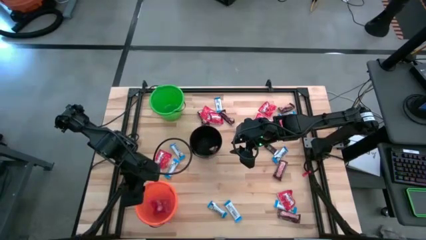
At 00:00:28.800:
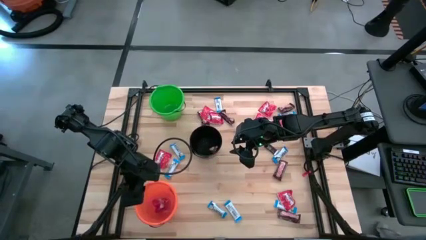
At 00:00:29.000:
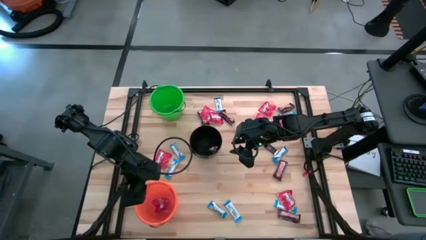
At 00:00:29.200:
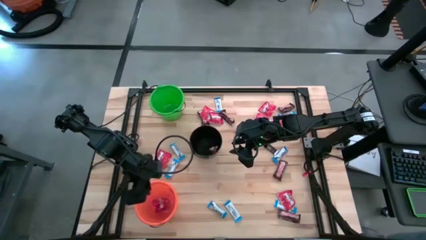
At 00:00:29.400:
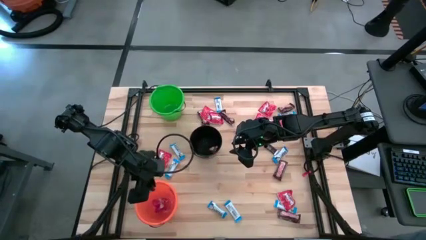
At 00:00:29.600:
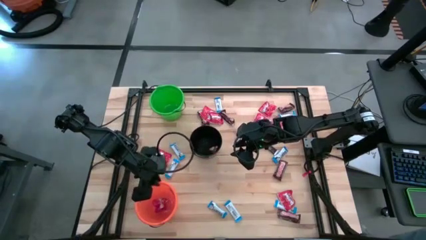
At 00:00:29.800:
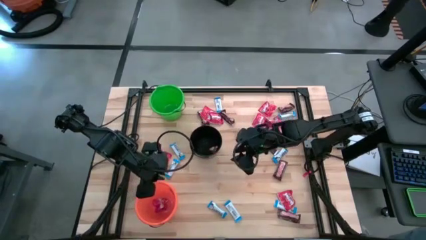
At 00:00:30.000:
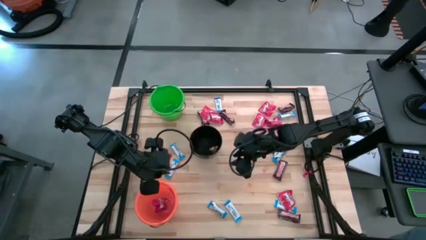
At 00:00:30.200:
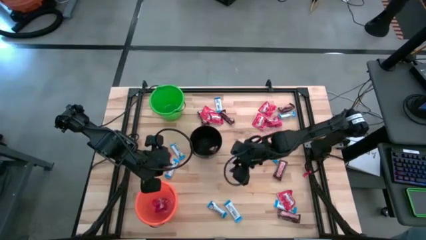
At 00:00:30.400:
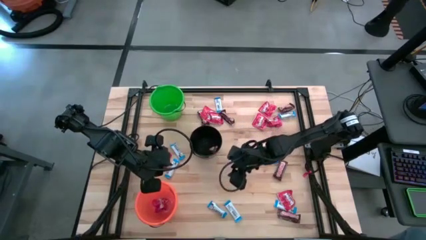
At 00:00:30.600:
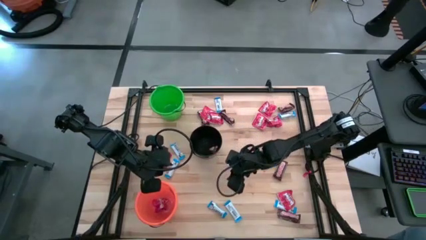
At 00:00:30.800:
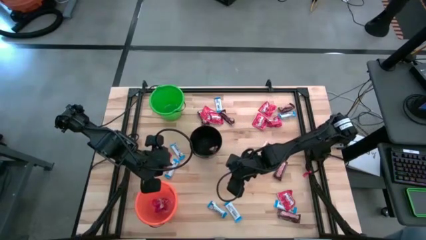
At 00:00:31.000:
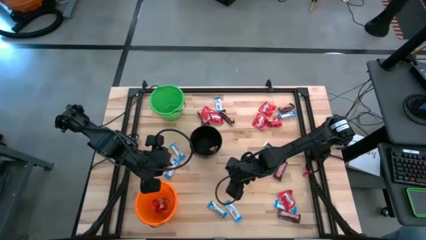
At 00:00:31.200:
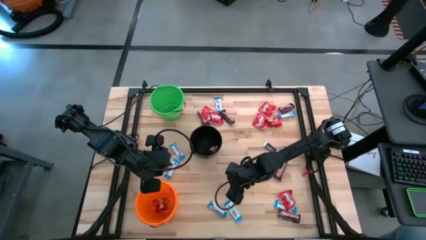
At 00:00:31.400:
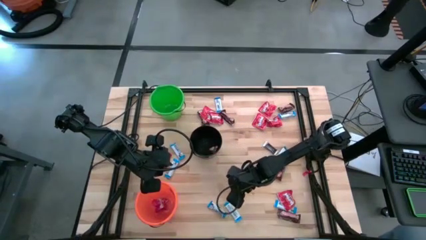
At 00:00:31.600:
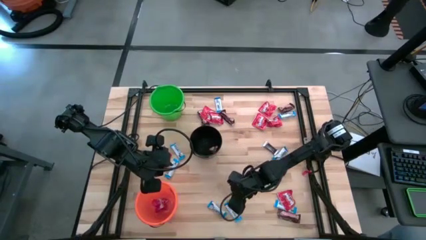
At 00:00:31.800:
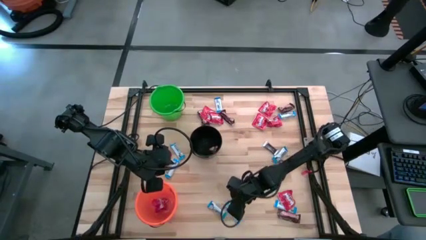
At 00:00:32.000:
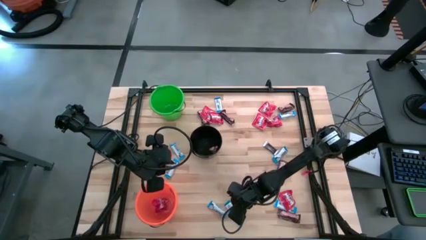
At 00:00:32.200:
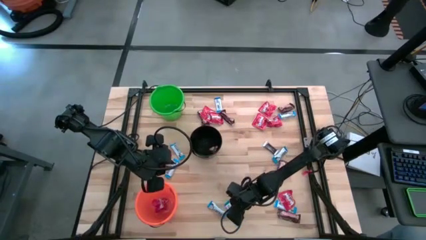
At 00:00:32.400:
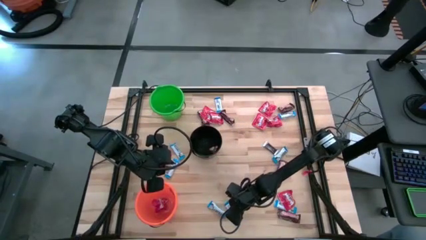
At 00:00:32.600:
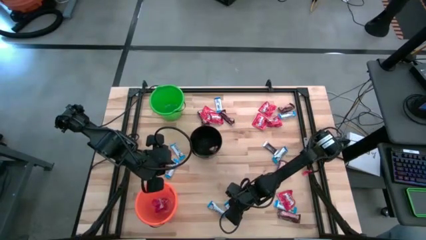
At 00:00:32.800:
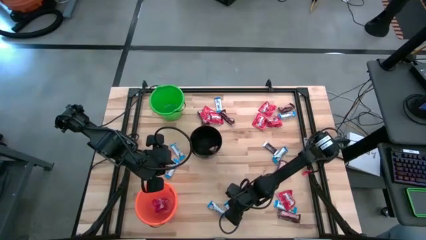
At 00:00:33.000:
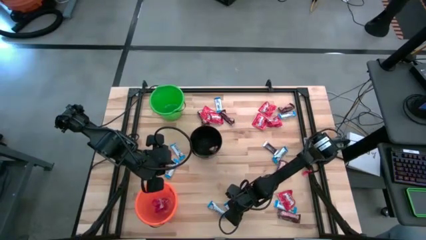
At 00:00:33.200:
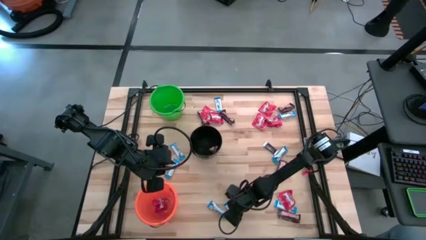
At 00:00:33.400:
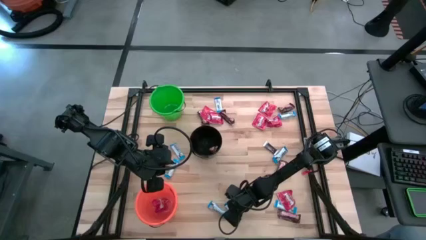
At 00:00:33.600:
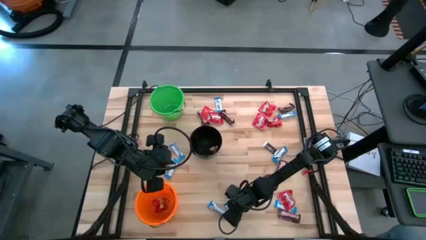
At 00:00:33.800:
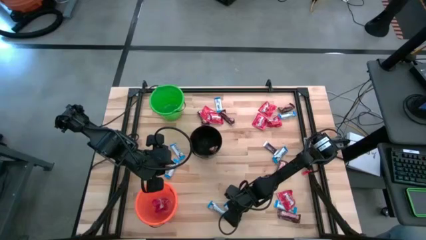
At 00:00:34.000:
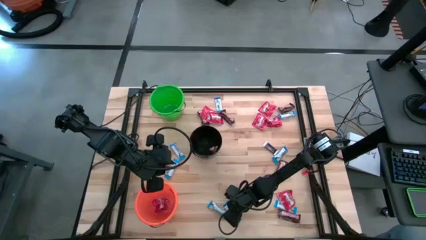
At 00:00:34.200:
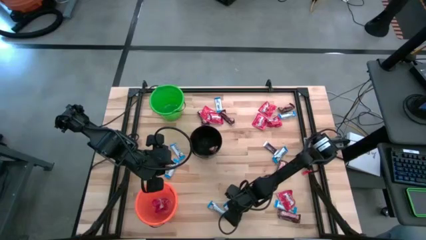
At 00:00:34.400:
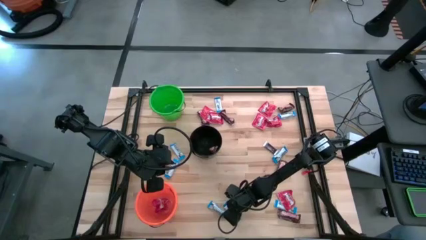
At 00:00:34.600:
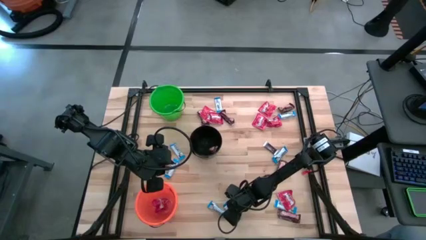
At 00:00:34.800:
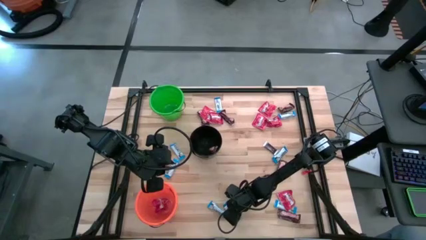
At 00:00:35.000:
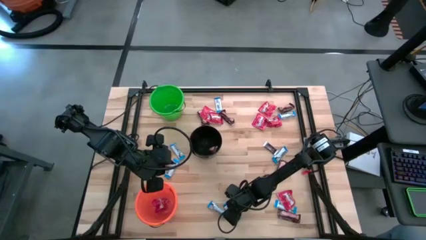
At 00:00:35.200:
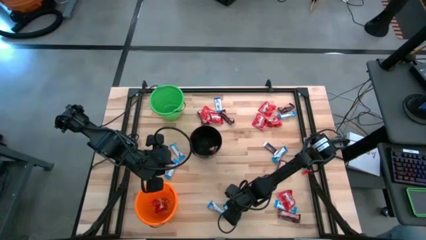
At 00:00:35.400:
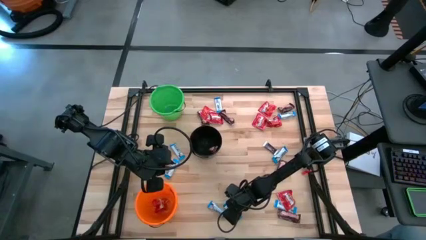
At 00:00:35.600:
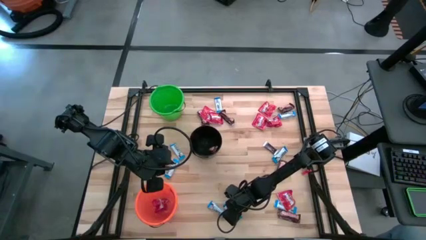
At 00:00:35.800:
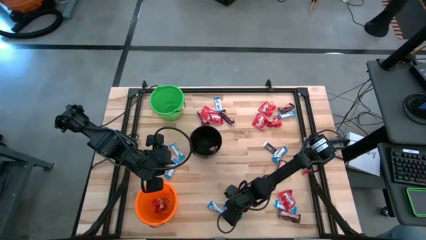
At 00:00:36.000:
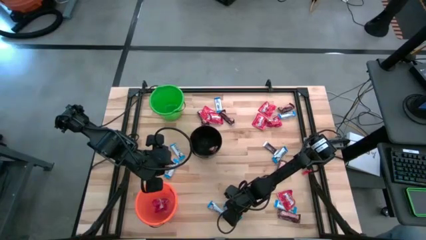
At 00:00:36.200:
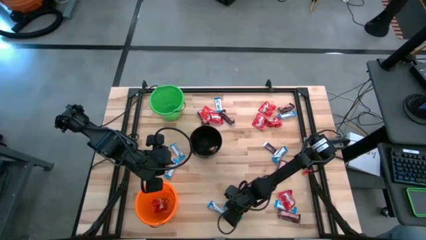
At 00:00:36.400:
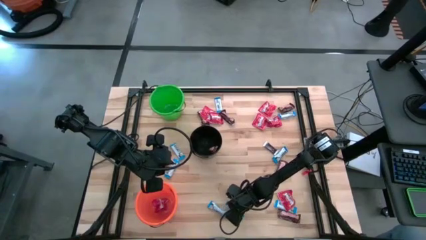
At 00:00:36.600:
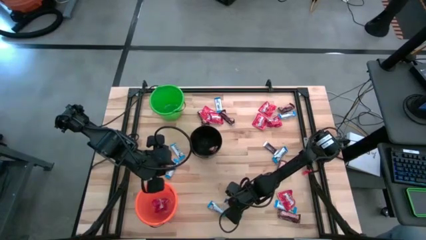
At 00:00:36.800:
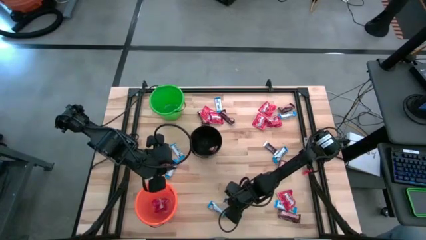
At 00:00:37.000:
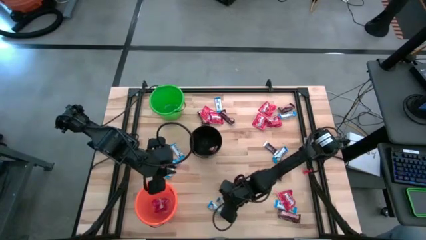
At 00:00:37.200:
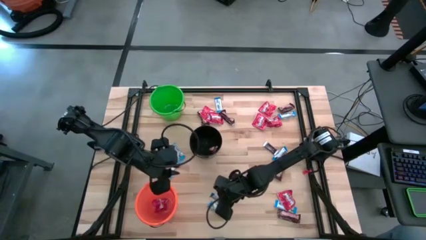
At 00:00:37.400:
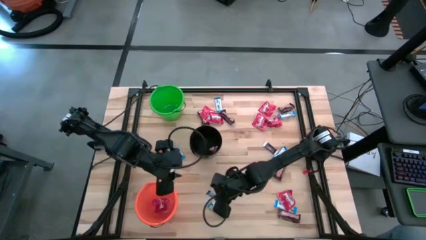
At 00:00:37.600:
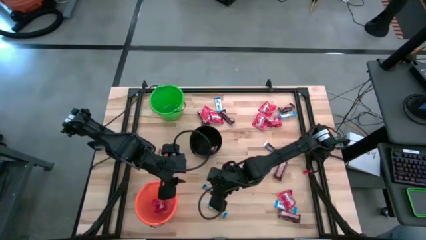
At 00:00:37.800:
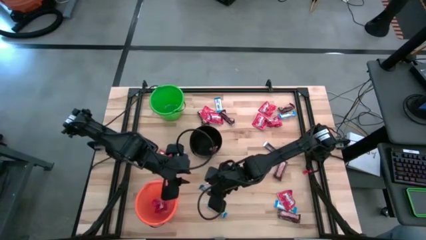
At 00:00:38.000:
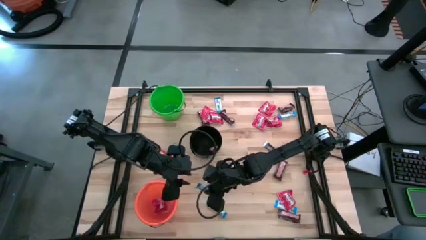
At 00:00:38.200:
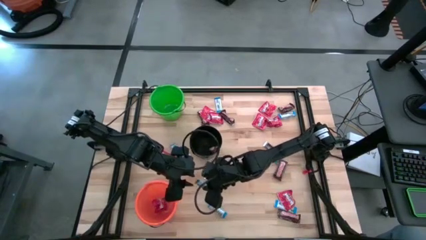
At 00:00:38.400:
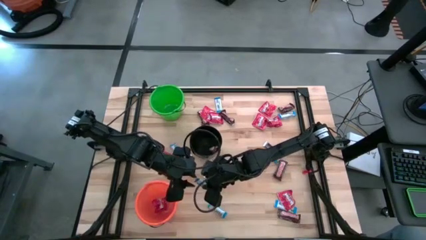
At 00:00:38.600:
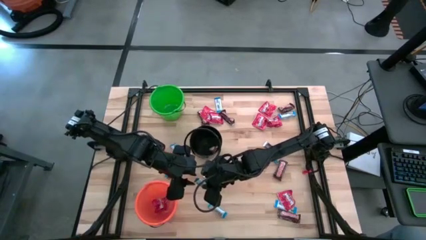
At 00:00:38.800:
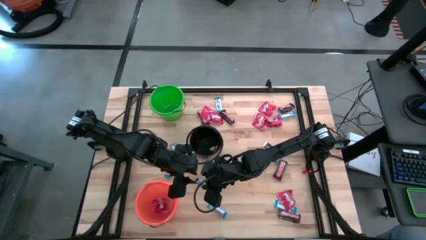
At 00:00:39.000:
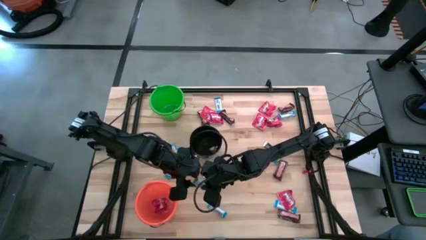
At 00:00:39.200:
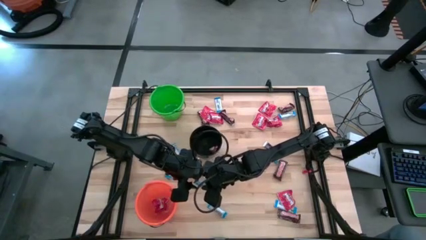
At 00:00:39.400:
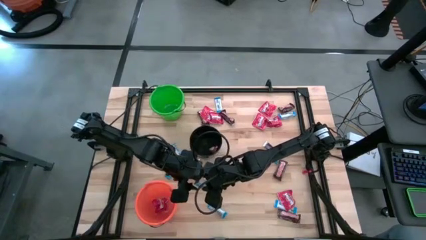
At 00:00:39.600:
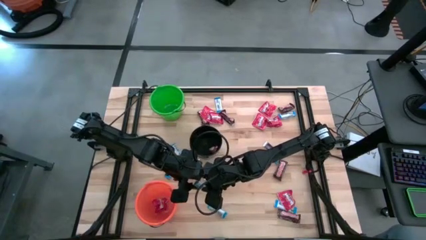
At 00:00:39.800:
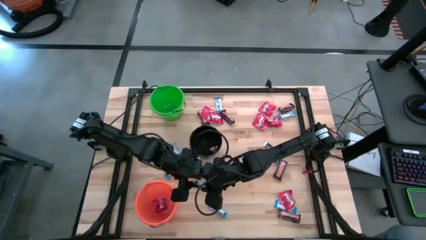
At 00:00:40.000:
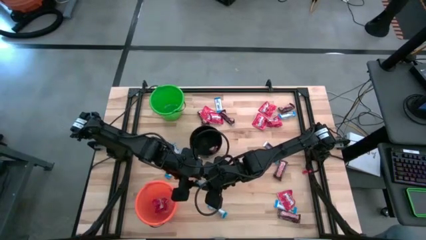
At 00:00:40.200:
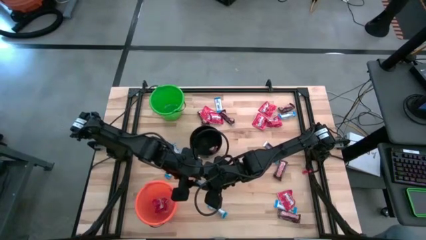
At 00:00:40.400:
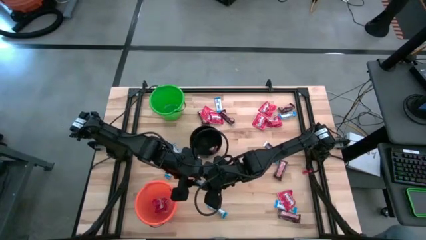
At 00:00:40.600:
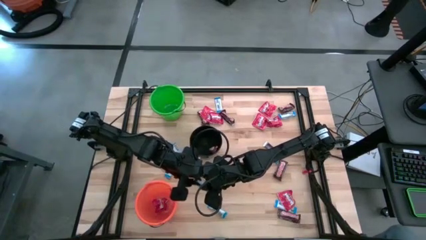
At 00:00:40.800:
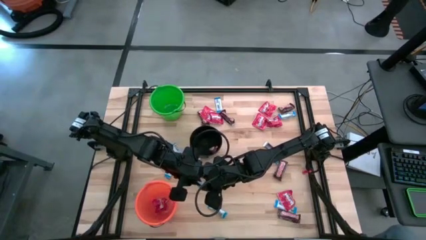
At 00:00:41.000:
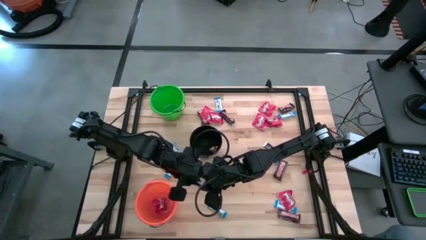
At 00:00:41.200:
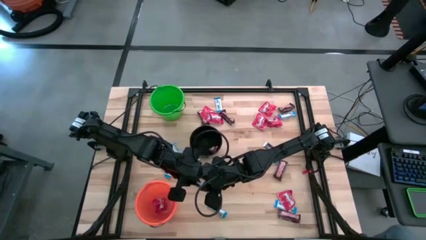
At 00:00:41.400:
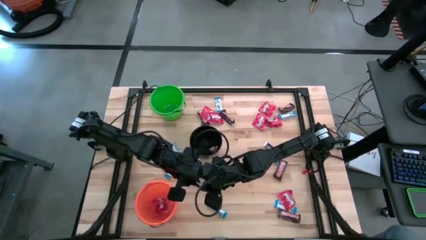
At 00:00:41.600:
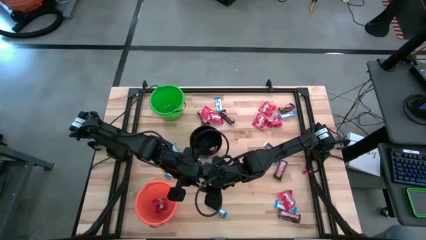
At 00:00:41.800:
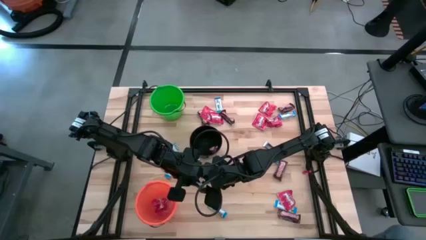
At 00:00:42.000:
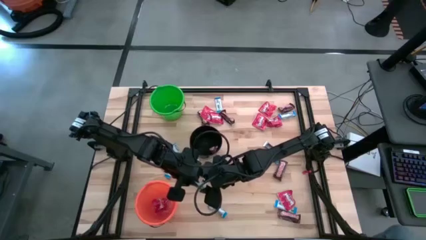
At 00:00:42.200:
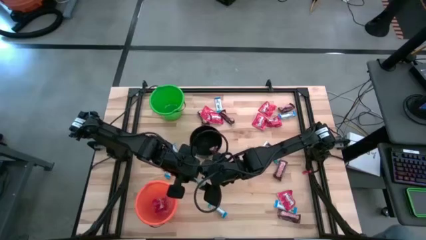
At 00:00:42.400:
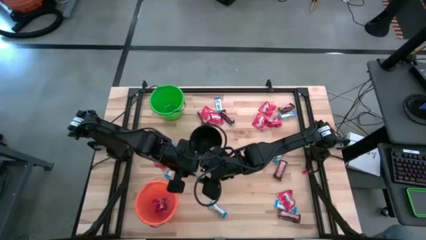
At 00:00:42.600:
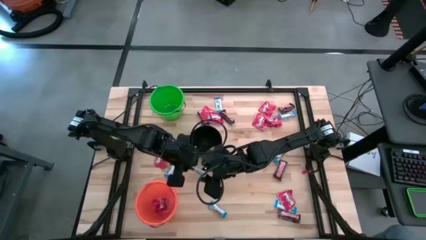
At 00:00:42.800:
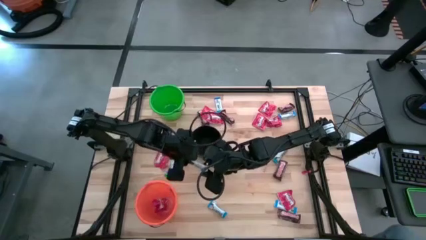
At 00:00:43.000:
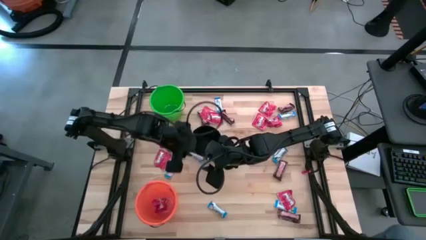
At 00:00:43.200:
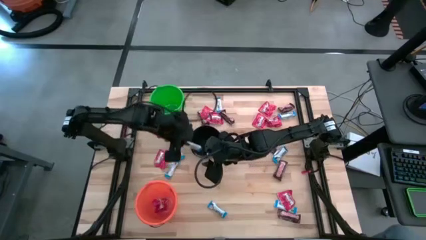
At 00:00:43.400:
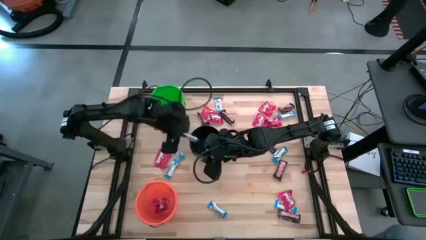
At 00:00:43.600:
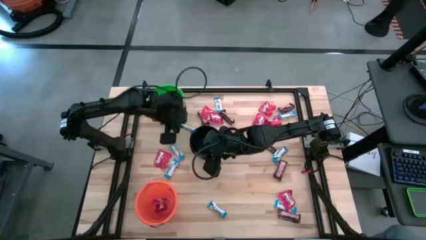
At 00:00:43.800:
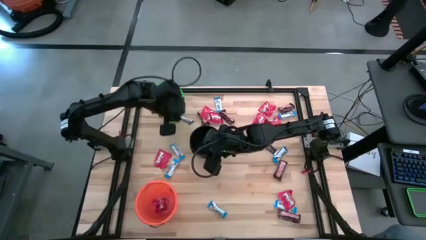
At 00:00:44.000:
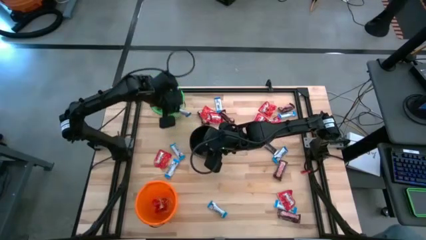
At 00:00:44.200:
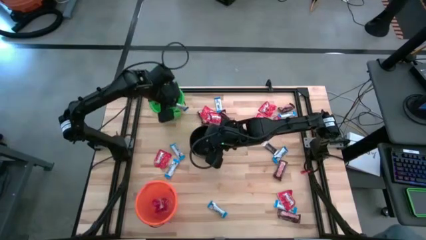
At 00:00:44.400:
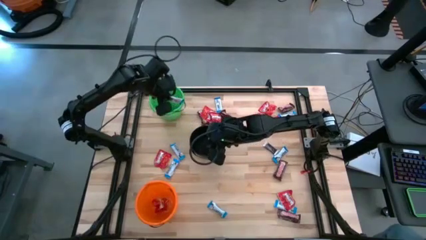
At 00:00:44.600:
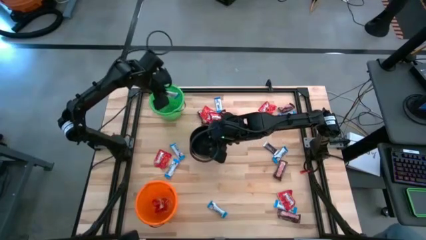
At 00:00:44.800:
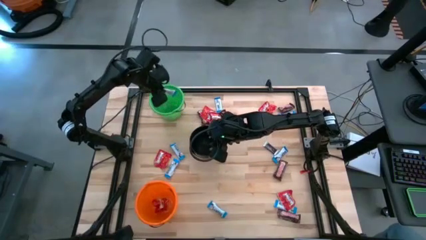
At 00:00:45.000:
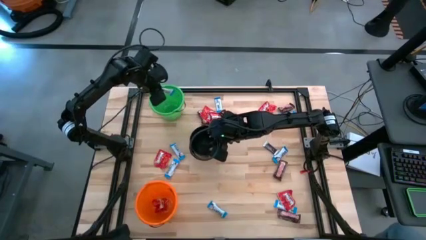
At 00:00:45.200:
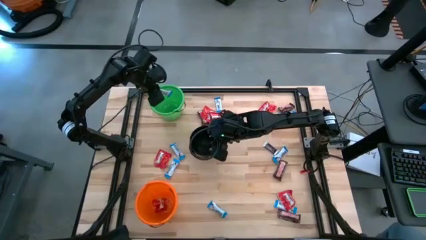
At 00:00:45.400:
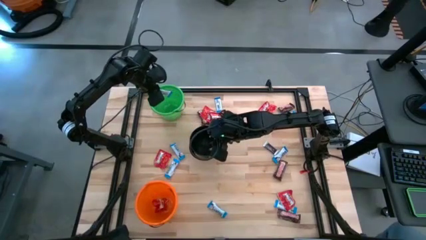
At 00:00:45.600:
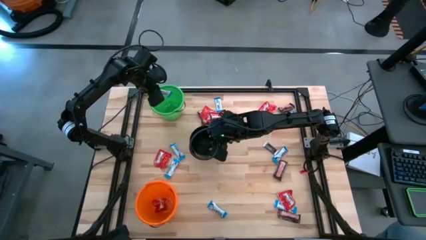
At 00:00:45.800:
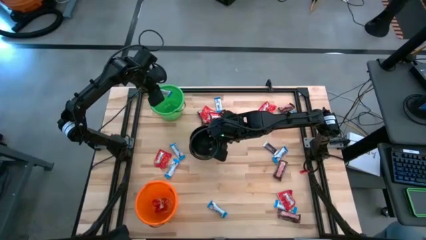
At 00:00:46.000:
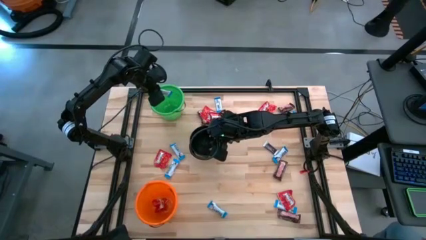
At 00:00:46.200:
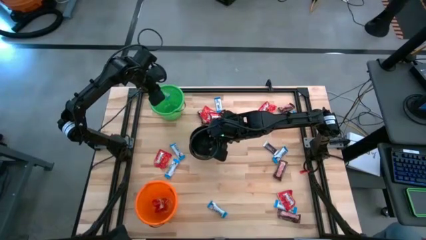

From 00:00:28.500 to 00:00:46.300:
Task: Sort candy
Put the white chocolate into the green bucket
